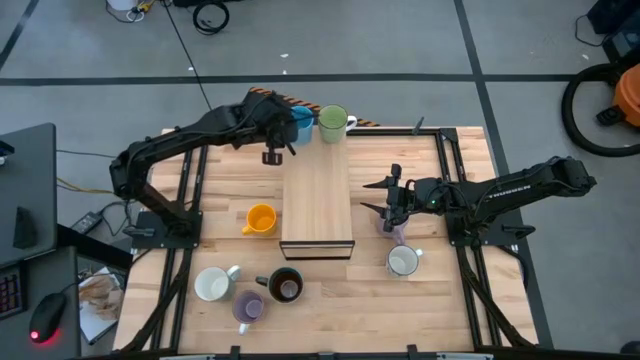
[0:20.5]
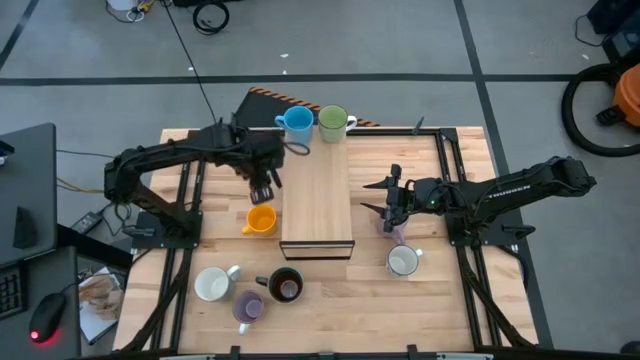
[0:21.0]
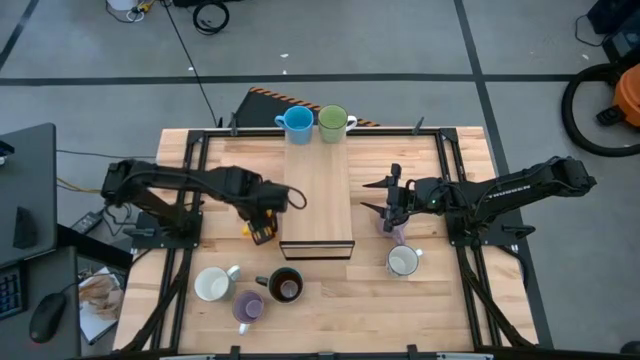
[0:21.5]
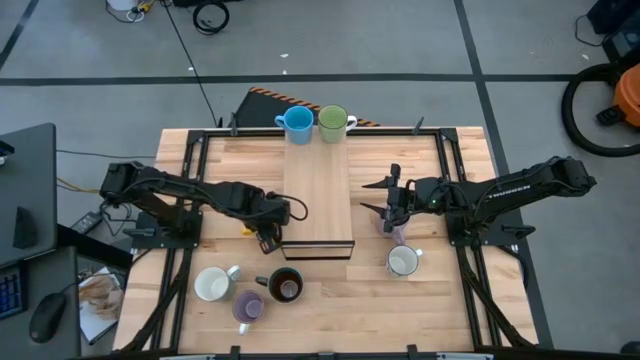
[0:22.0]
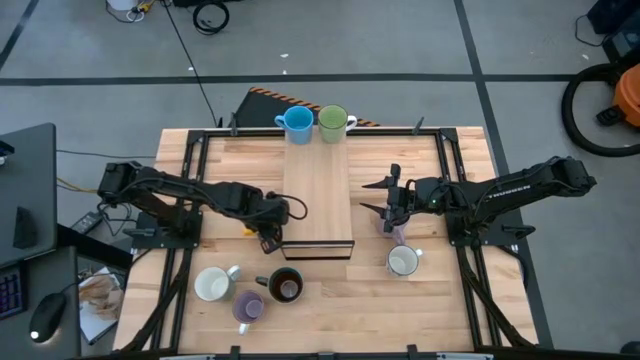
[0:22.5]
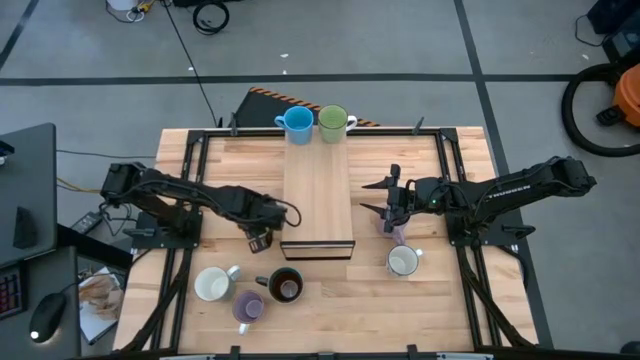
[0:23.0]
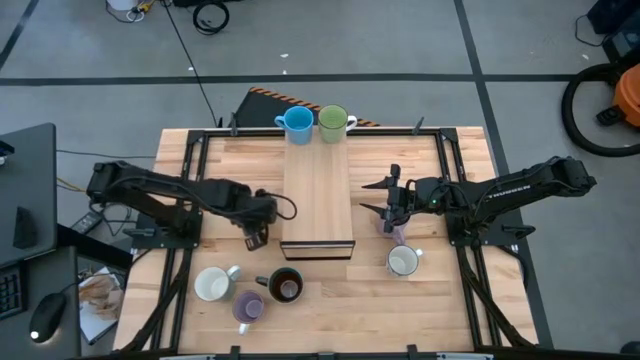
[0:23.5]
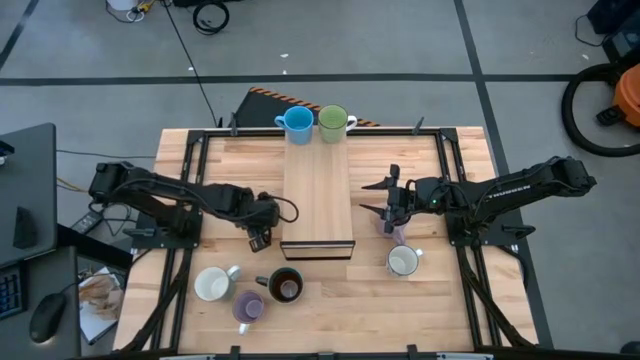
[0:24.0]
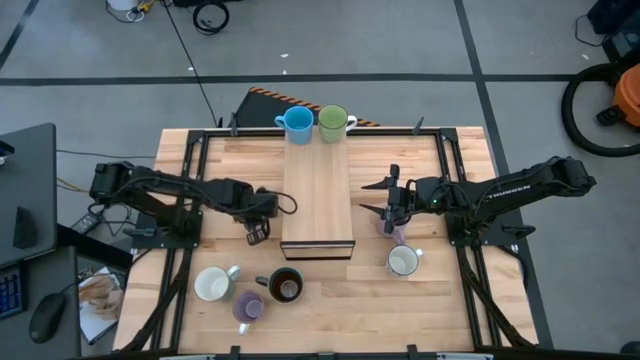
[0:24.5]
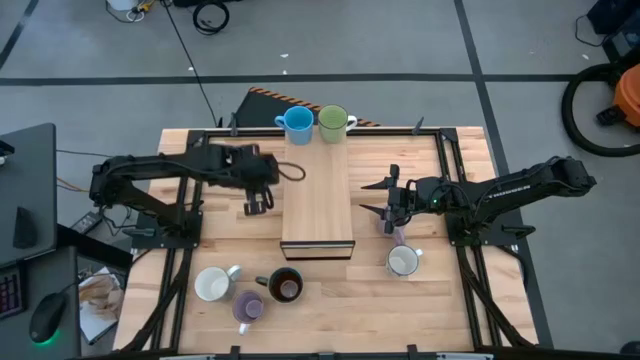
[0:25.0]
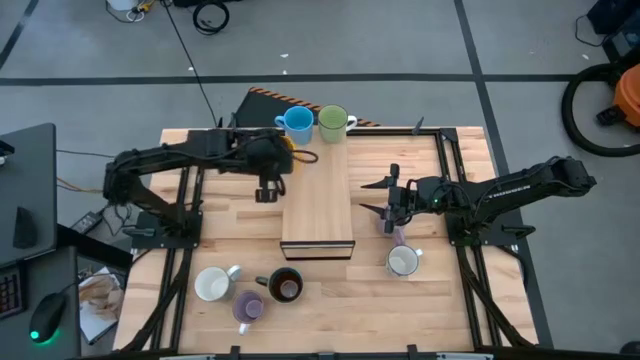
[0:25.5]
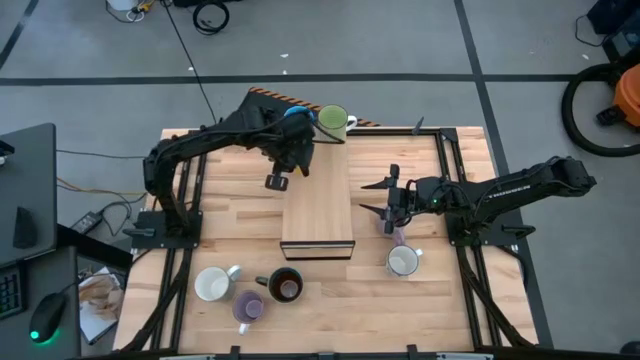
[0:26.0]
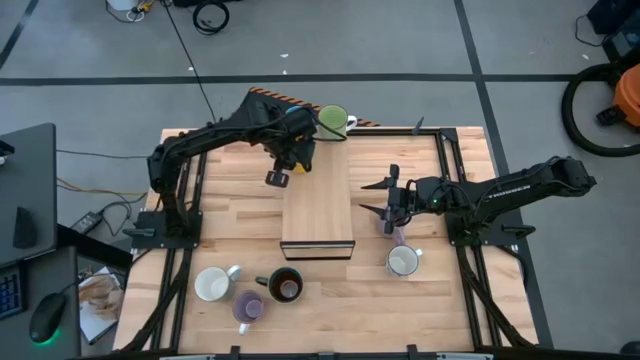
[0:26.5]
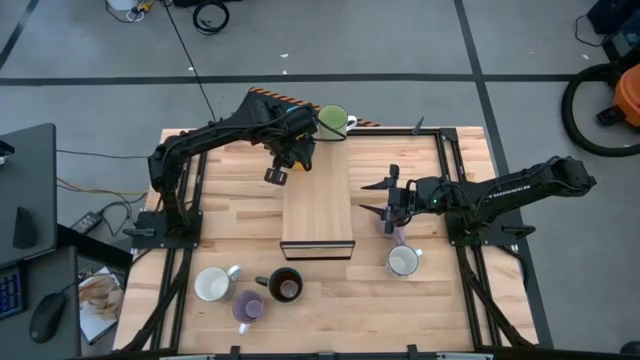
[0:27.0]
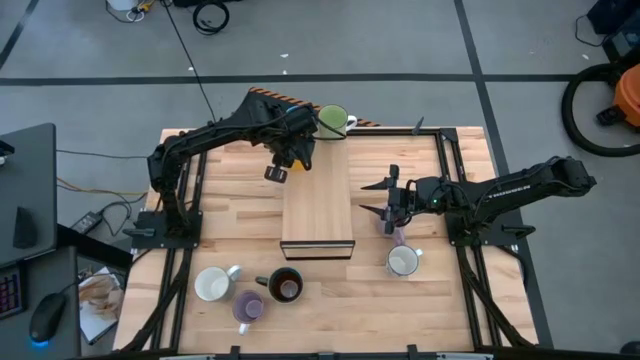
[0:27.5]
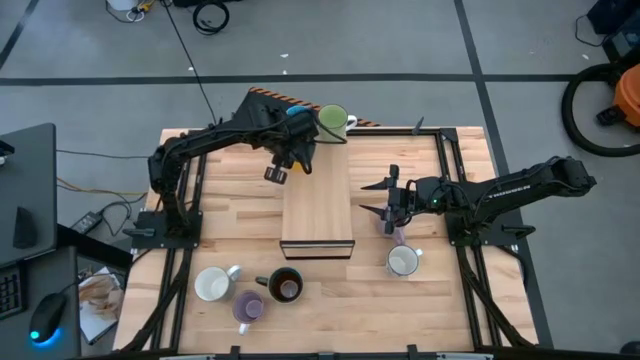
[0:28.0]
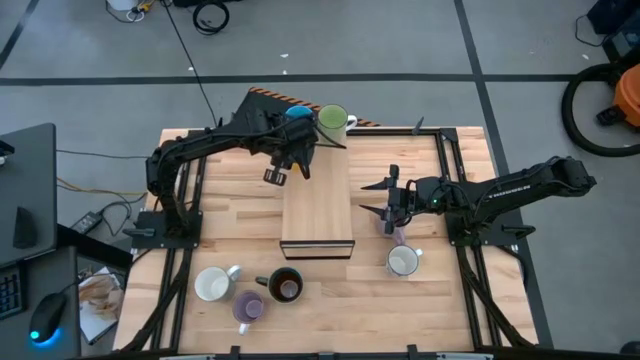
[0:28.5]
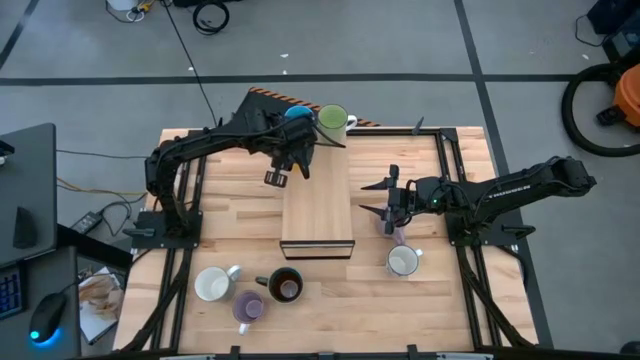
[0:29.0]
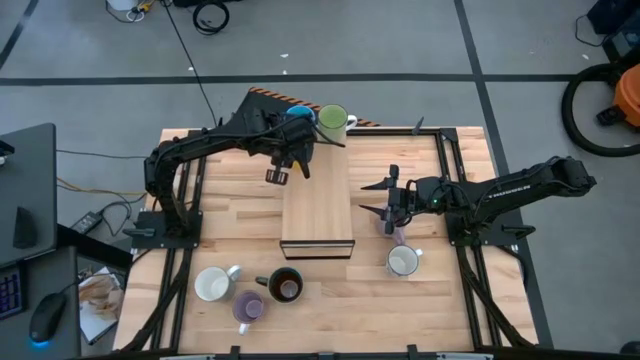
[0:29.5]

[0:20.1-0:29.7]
Task: Place coffee mugs
Put the yellow mug on the shelf

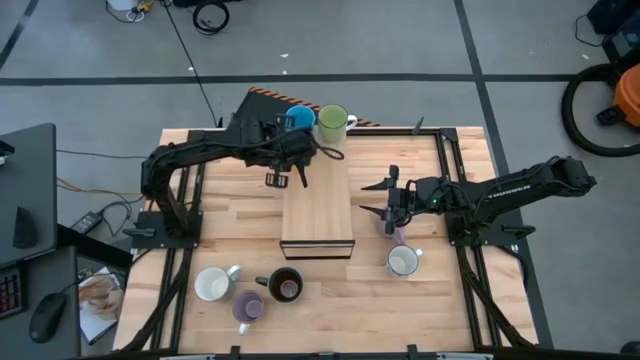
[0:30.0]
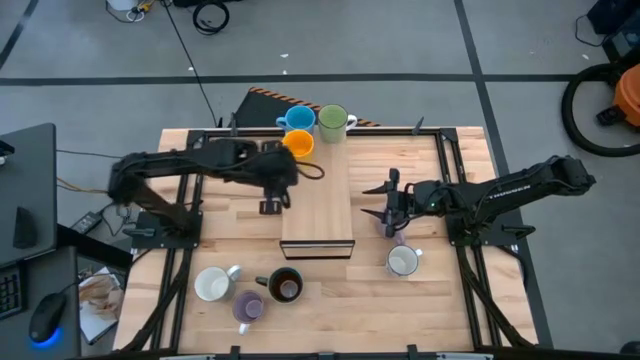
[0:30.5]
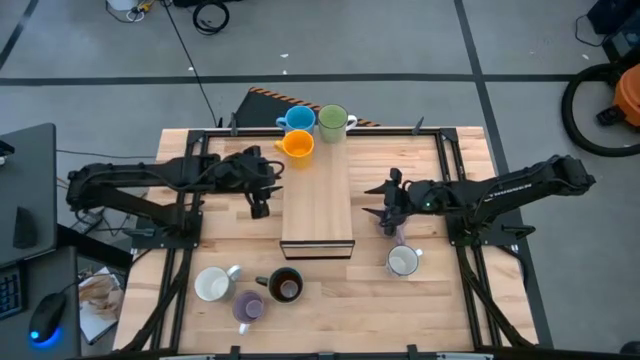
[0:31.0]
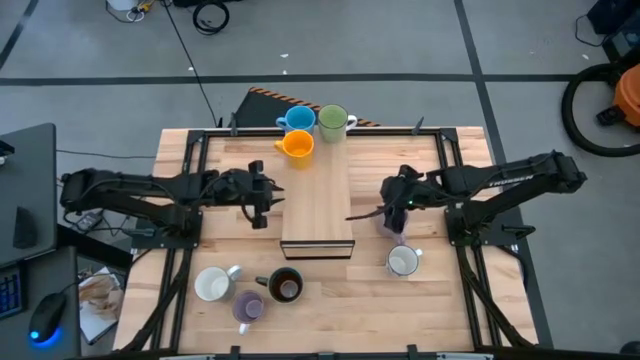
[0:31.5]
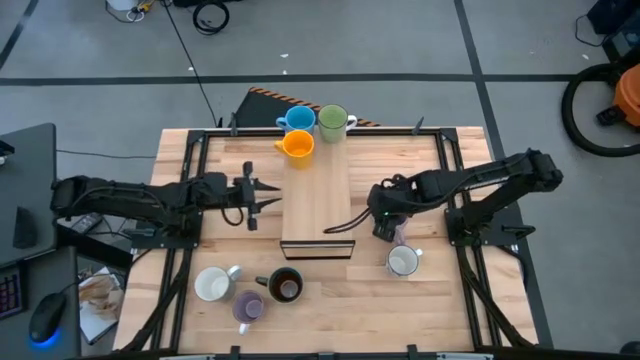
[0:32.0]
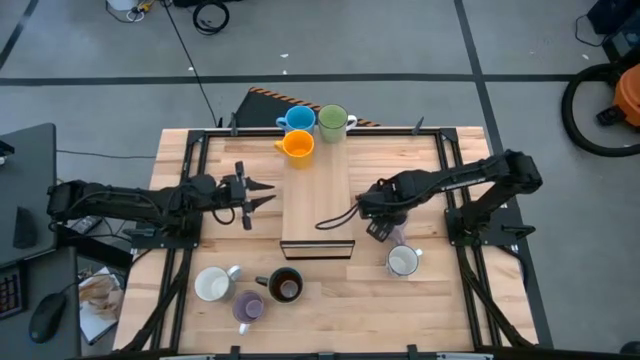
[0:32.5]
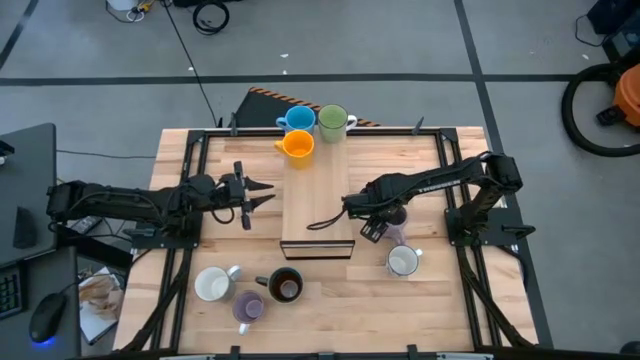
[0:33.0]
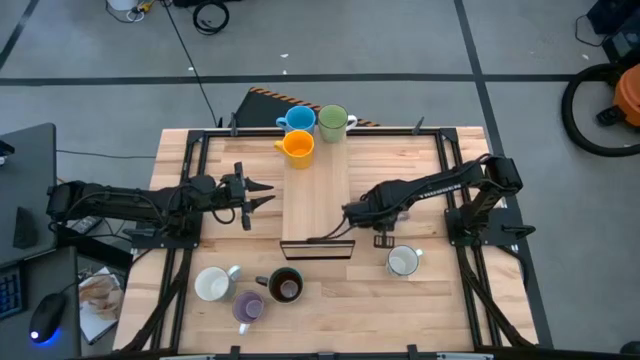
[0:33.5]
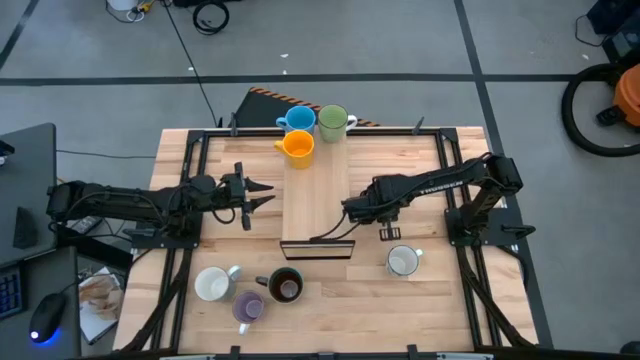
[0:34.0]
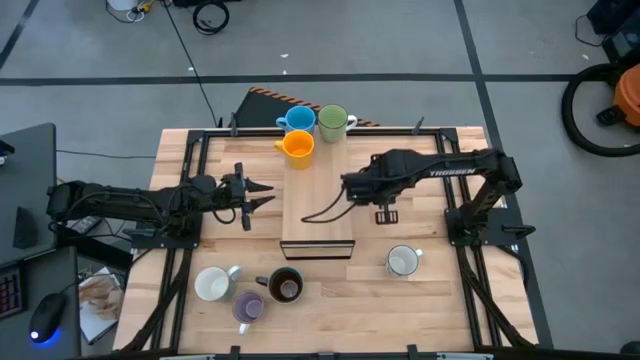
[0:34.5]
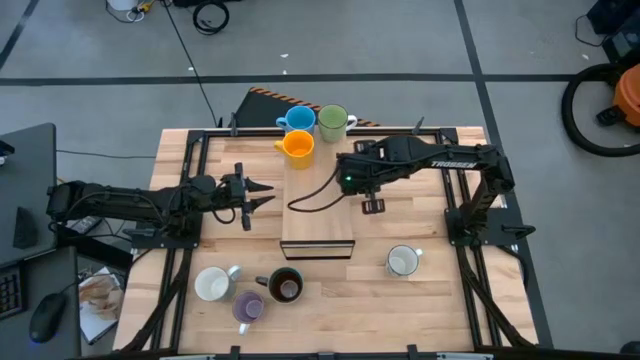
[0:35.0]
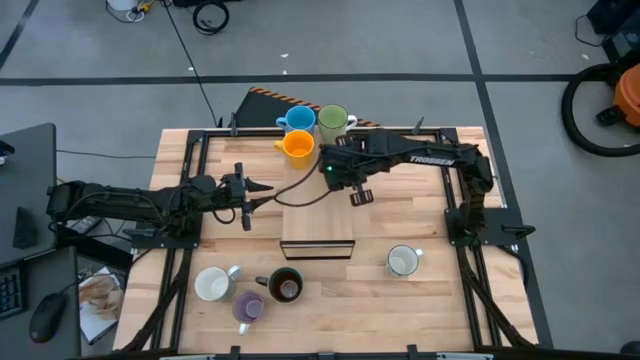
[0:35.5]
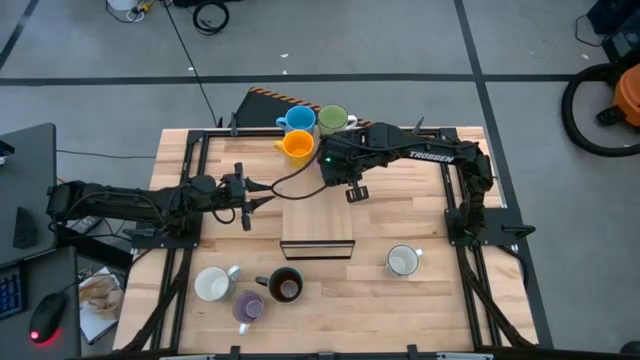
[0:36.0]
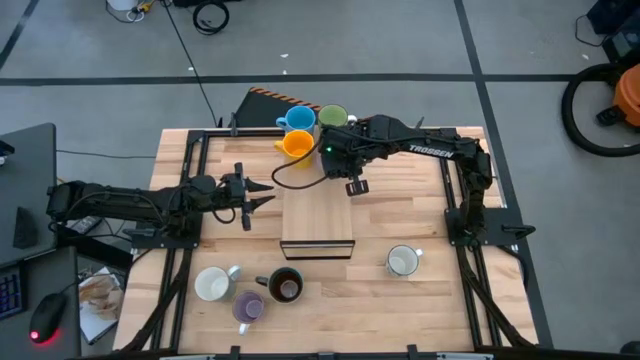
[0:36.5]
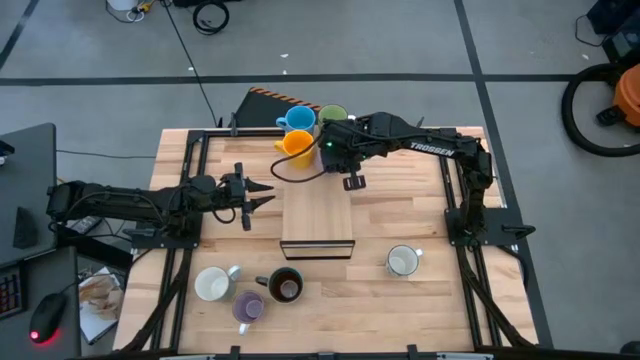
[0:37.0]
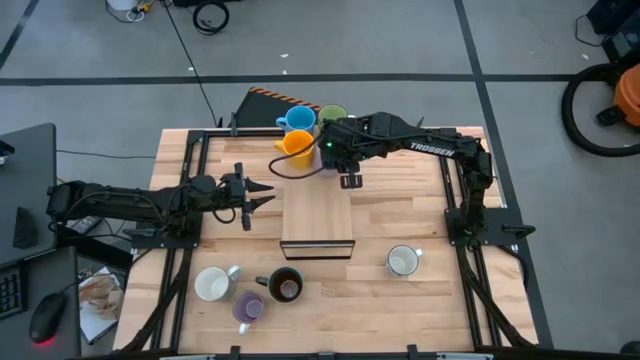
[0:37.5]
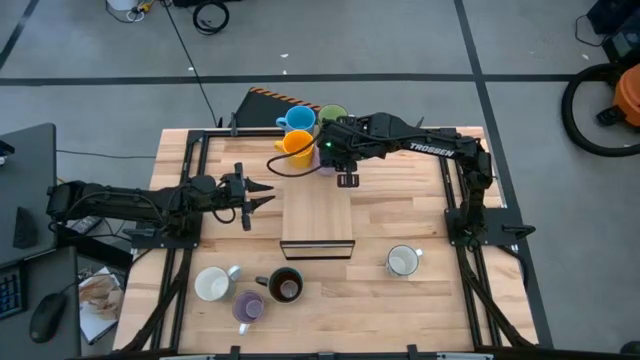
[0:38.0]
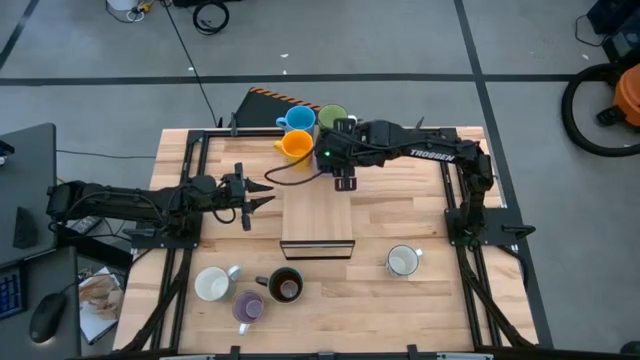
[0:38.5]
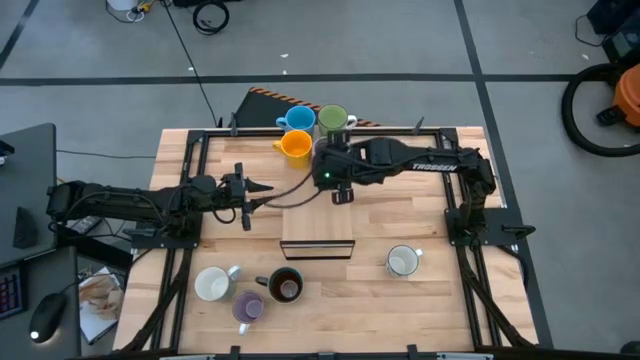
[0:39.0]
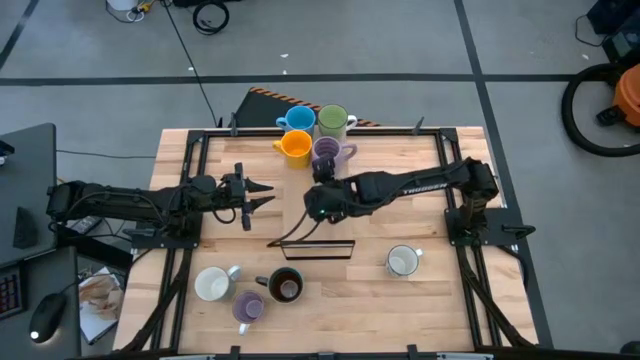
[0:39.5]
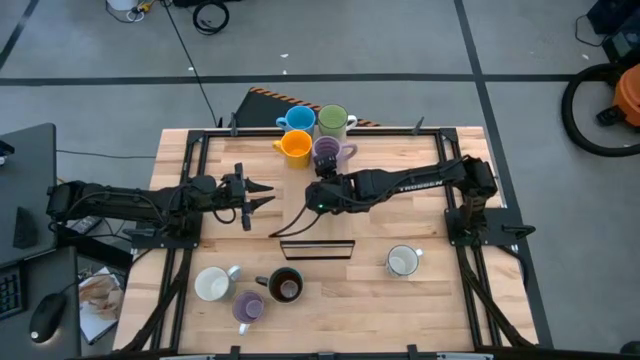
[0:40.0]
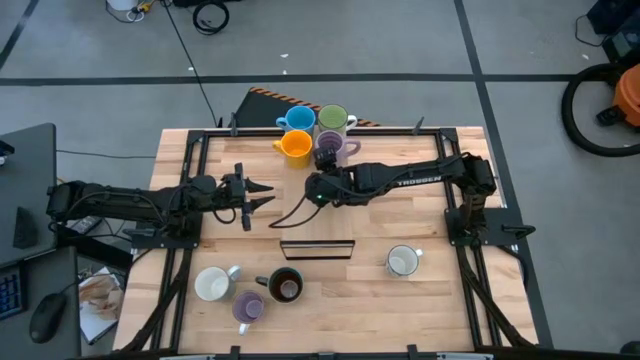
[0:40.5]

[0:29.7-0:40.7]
Put the purple mug on the shelf

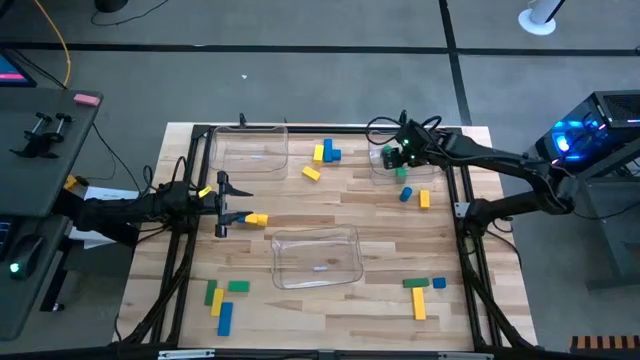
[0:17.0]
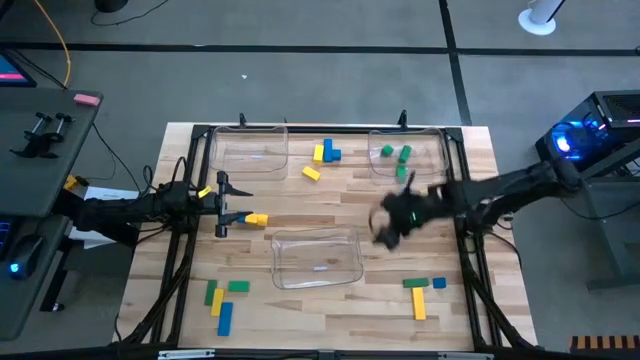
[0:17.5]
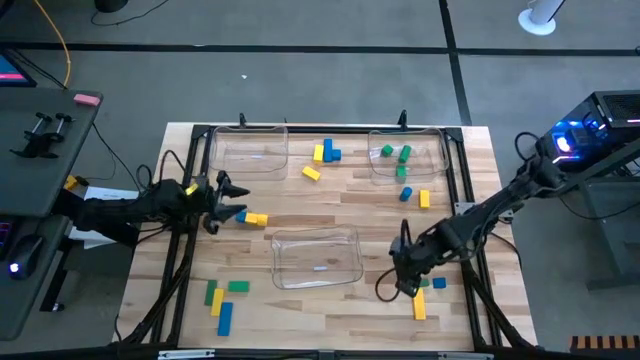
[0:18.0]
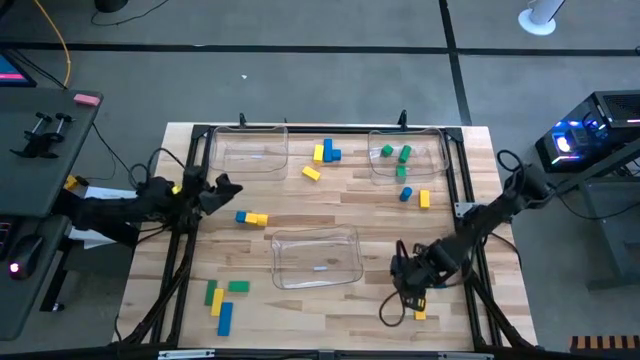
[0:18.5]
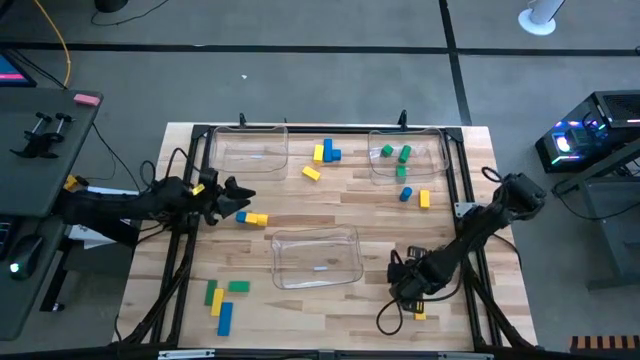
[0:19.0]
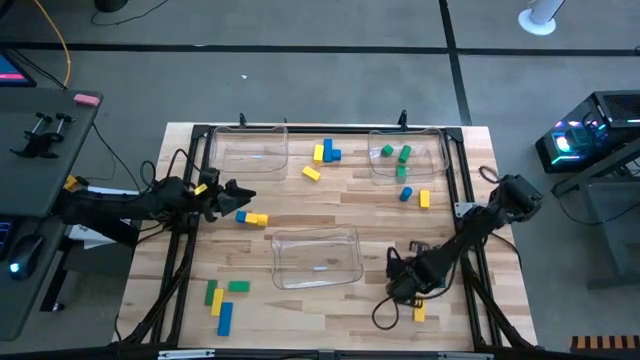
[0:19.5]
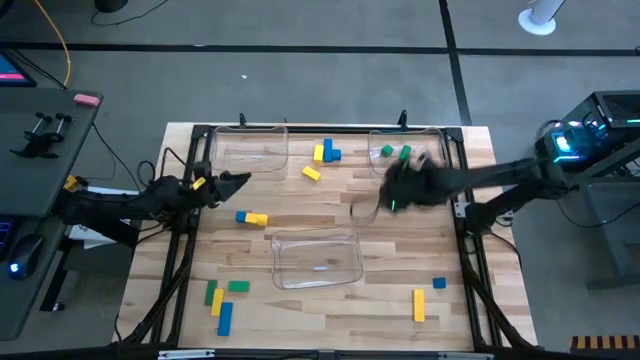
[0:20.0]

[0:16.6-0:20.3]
Task: Sort blocks
Put the green block into the top right transparent bin
